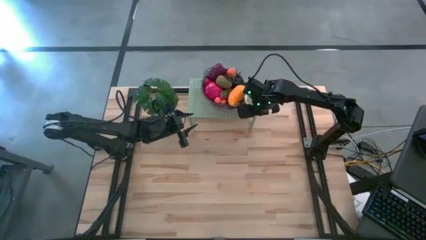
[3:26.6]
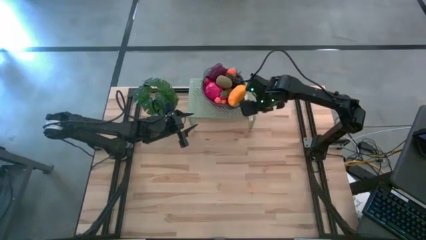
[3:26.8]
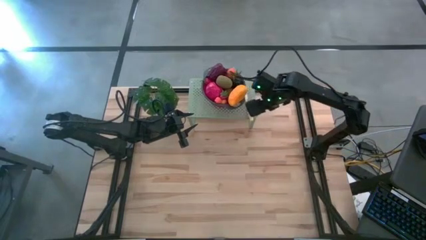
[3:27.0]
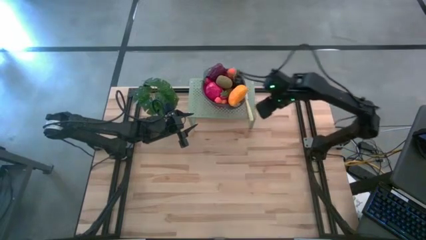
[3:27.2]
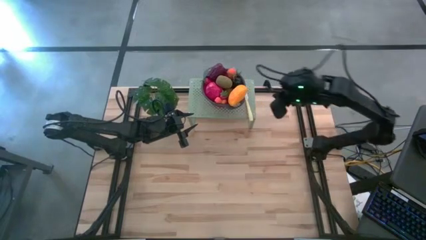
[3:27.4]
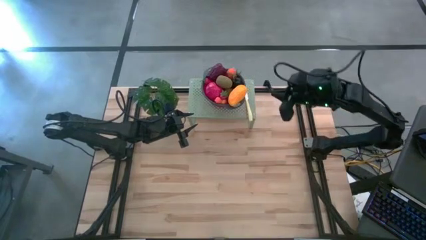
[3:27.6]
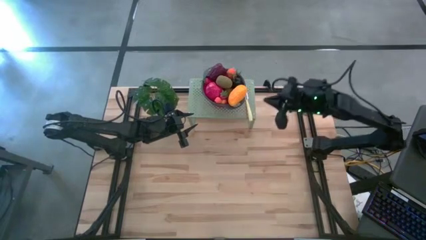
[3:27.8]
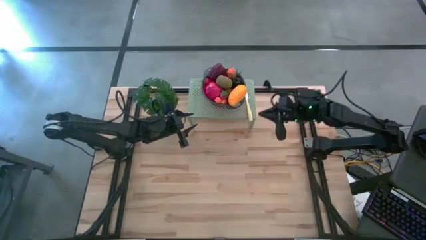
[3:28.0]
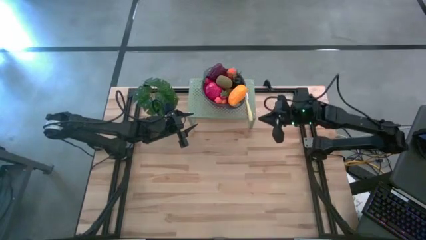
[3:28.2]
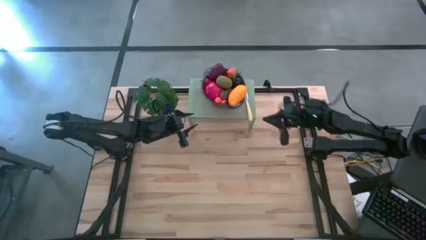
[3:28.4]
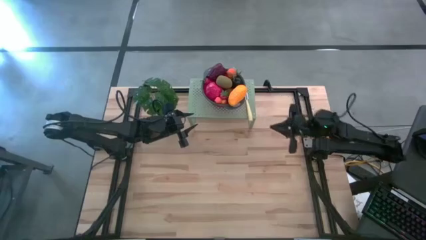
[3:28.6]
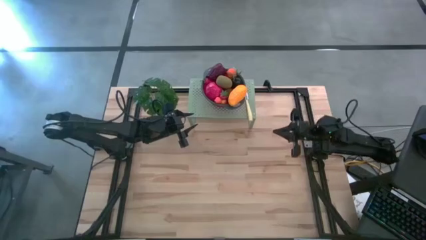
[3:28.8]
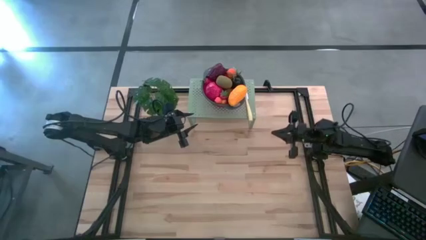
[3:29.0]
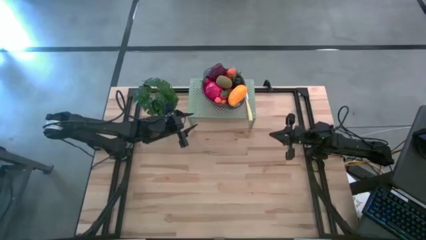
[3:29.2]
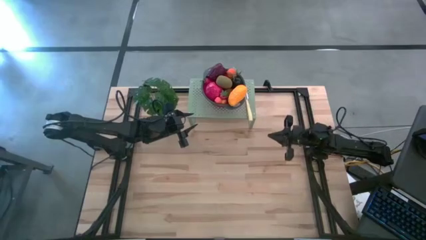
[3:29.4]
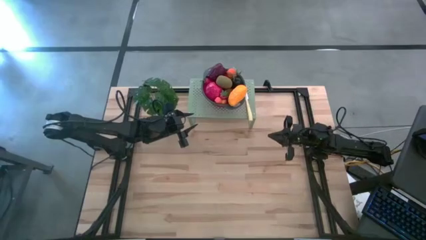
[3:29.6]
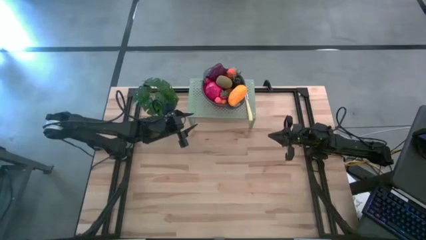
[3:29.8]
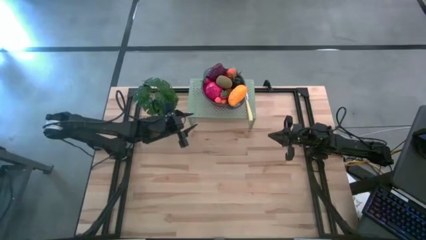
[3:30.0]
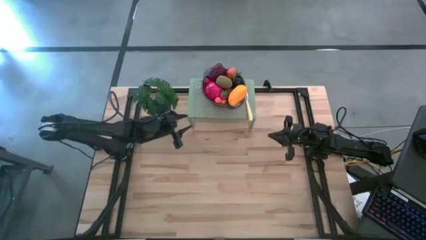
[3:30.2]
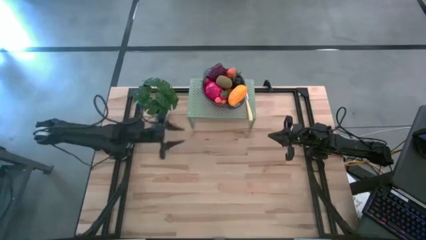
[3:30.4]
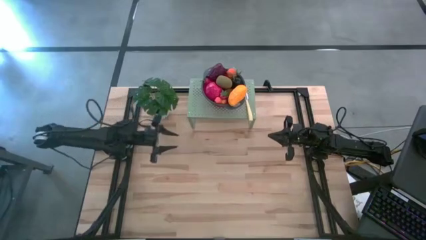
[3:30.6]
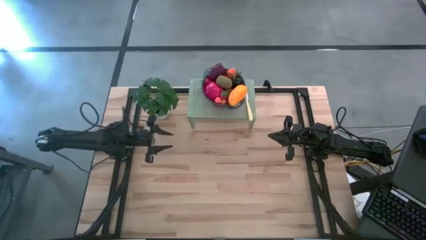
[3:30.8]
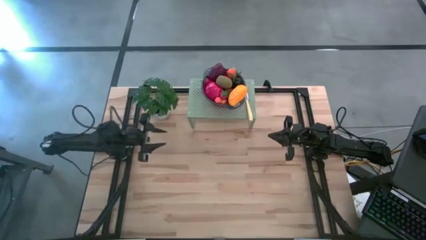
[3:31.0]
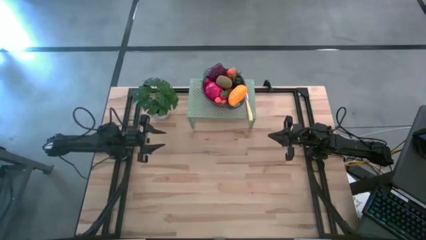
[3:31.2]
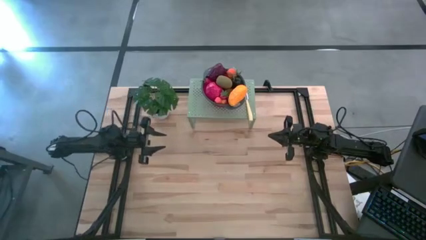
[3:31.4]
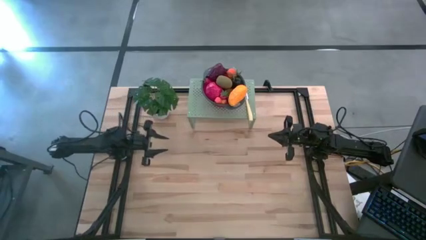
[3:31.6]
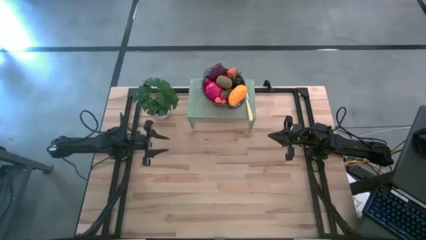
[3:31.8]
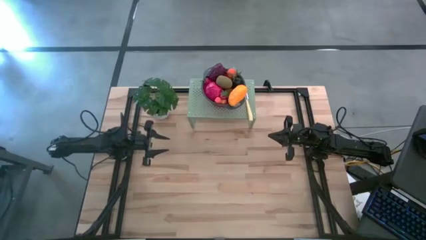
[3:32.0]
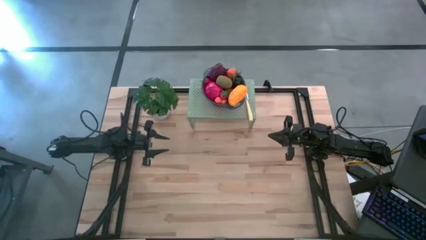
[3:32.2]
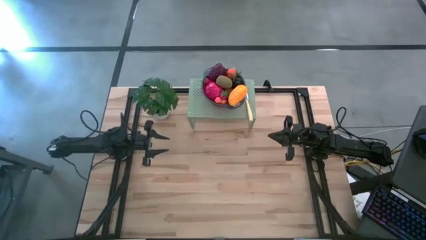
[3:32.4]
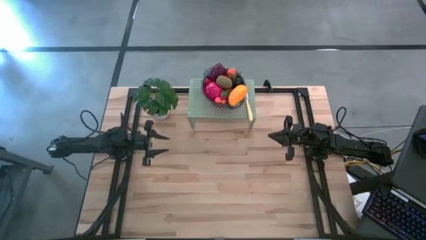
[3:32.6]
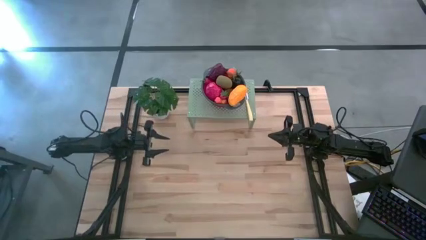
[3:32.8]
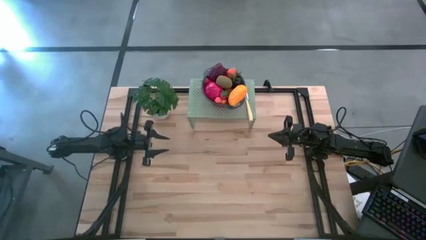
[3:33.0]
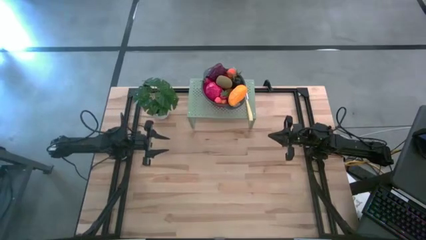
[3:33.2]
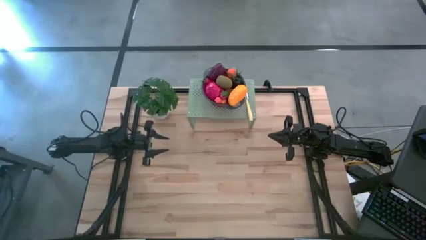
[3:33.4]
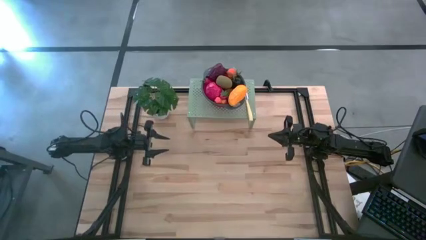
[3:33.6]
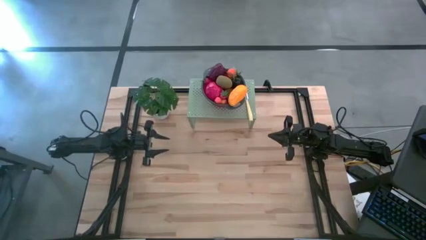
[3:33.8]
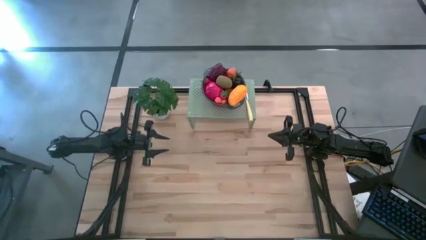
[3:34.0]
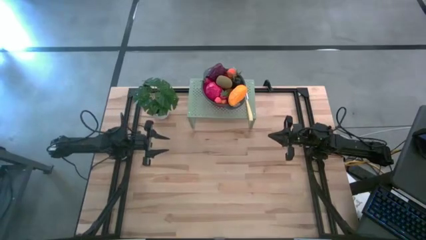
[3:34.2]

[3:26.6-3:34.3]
Task: Pick & Place Fruit
Return to Home Position

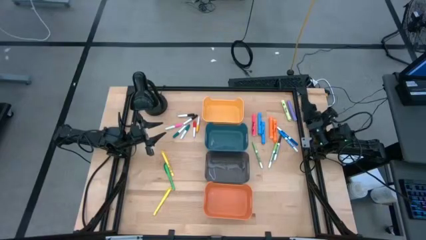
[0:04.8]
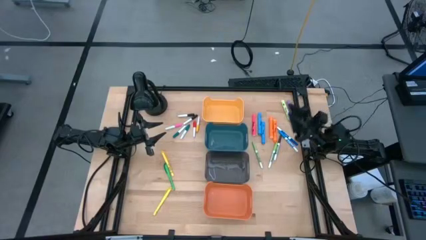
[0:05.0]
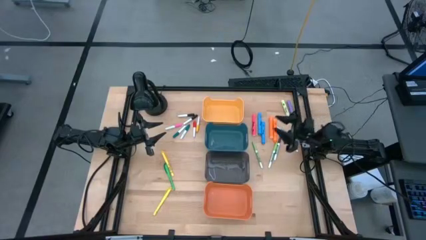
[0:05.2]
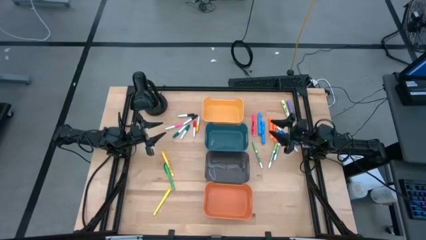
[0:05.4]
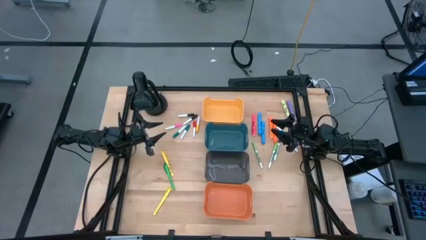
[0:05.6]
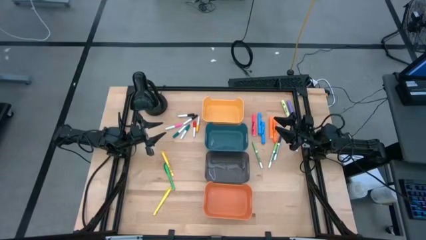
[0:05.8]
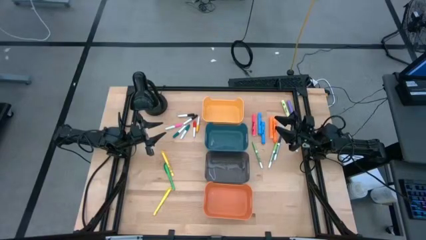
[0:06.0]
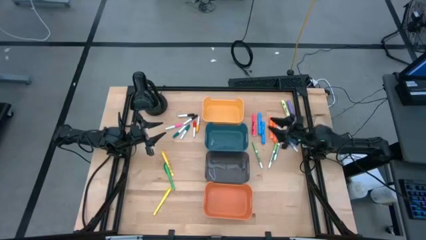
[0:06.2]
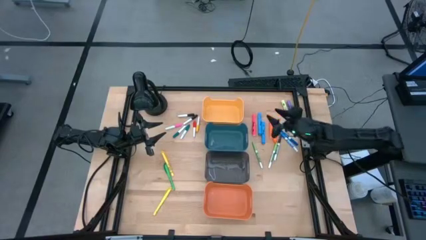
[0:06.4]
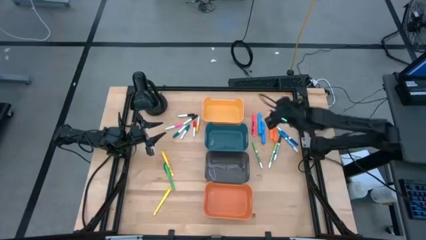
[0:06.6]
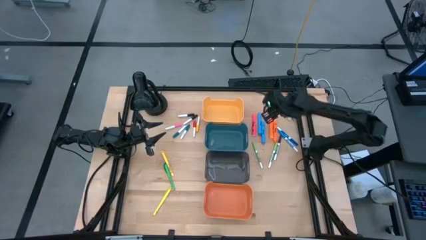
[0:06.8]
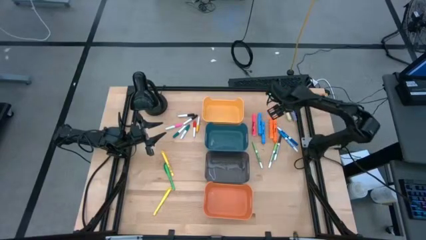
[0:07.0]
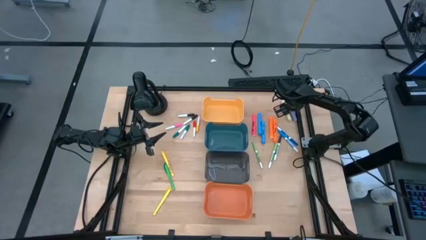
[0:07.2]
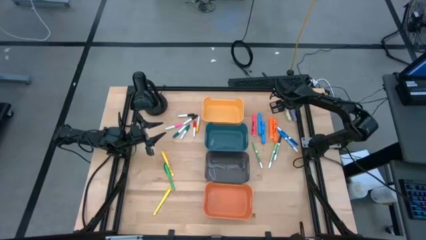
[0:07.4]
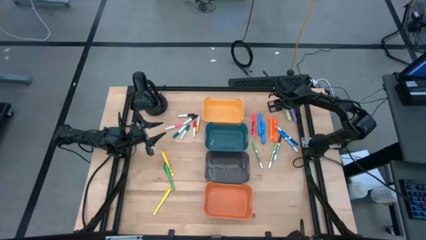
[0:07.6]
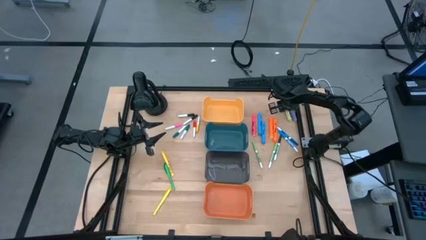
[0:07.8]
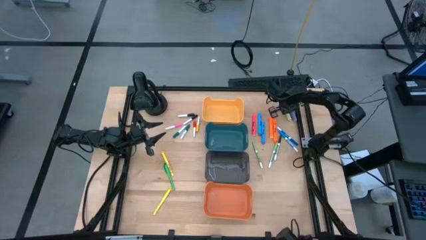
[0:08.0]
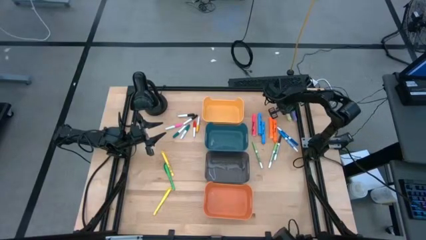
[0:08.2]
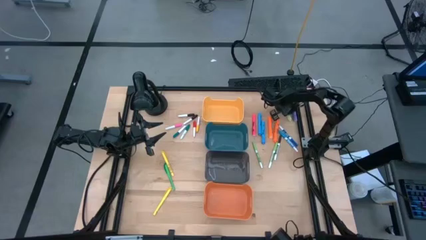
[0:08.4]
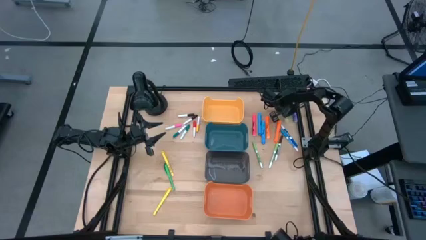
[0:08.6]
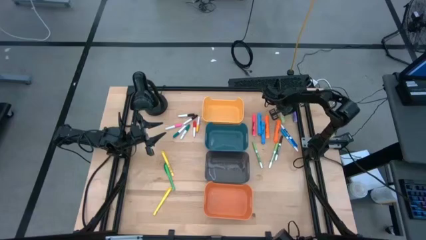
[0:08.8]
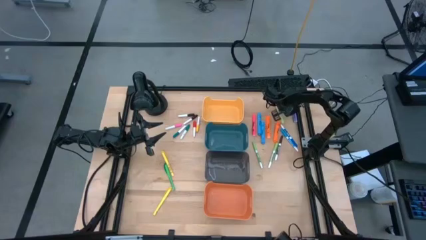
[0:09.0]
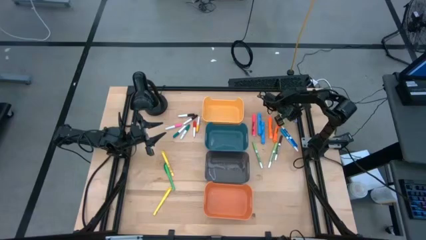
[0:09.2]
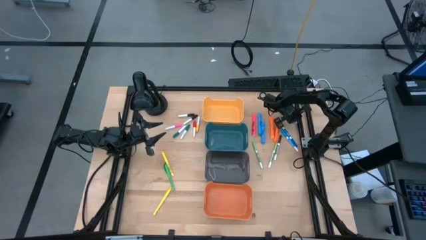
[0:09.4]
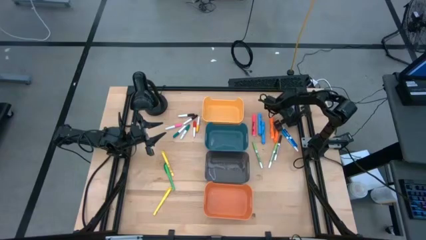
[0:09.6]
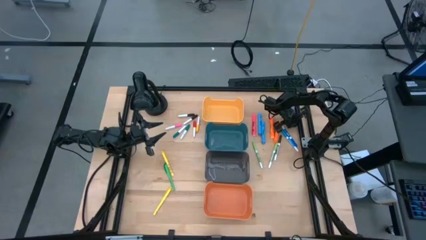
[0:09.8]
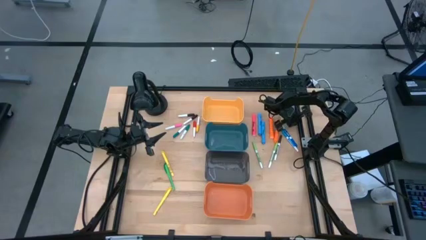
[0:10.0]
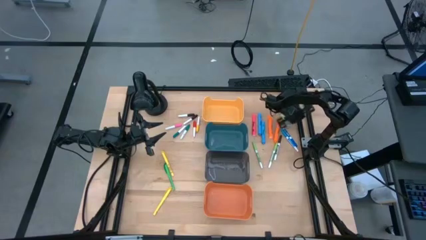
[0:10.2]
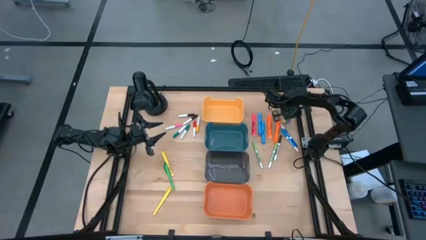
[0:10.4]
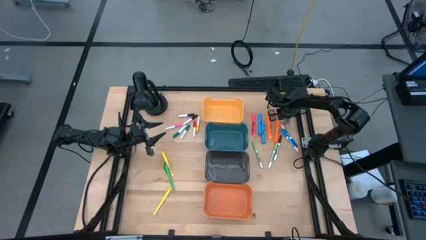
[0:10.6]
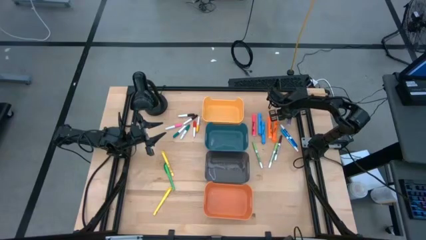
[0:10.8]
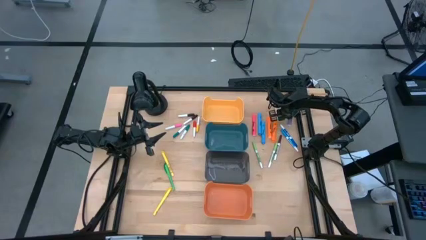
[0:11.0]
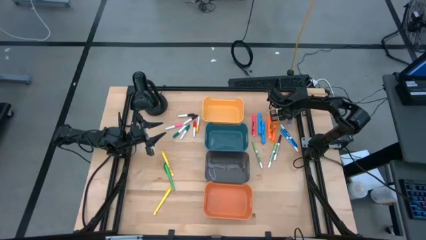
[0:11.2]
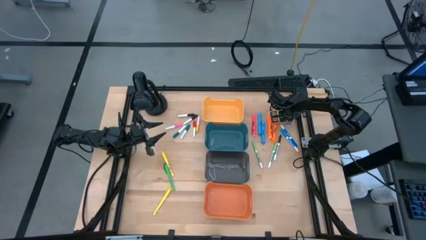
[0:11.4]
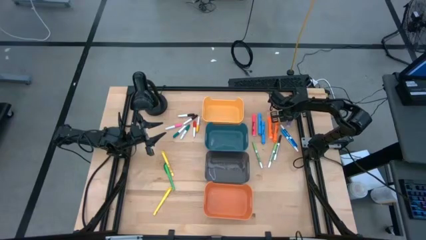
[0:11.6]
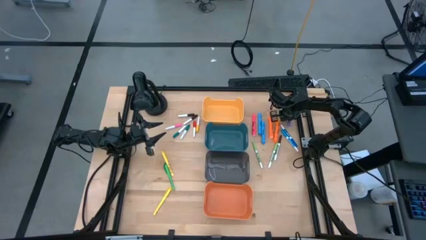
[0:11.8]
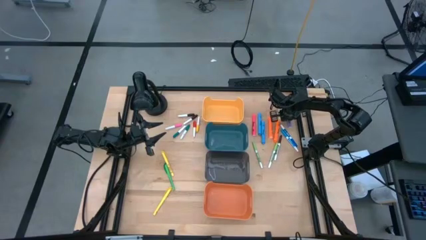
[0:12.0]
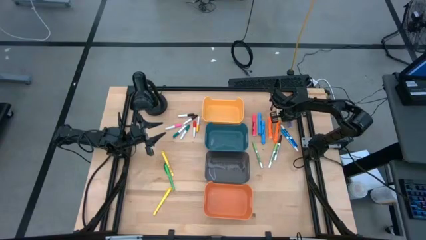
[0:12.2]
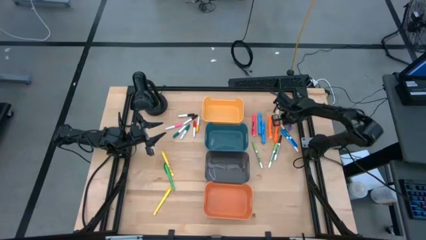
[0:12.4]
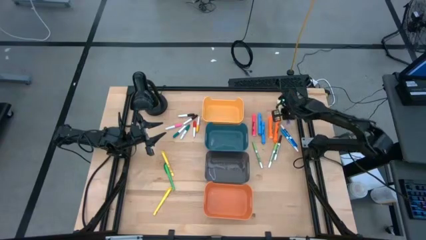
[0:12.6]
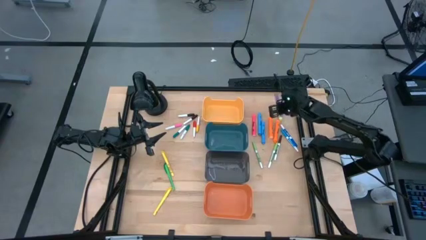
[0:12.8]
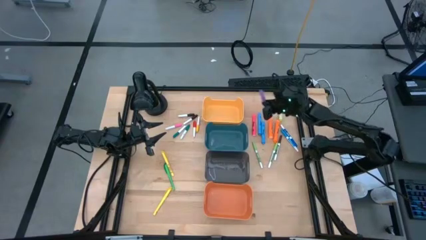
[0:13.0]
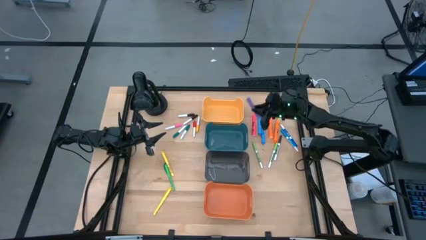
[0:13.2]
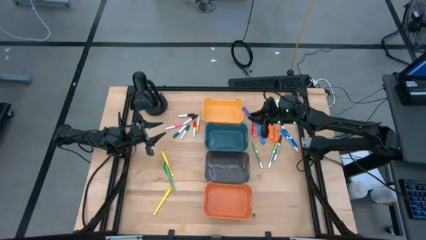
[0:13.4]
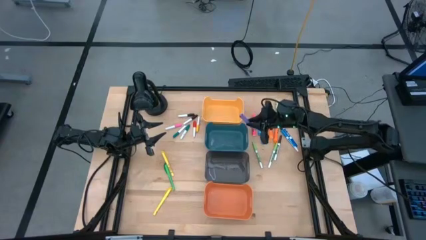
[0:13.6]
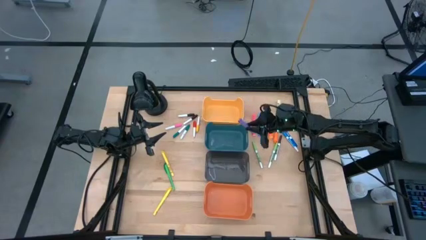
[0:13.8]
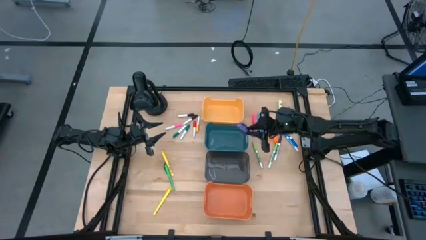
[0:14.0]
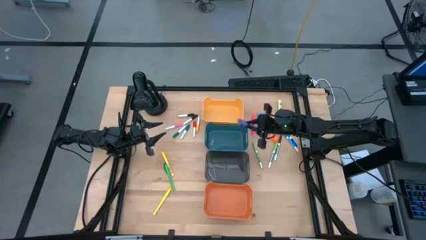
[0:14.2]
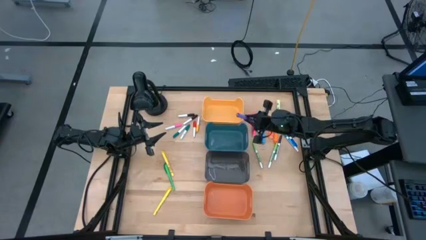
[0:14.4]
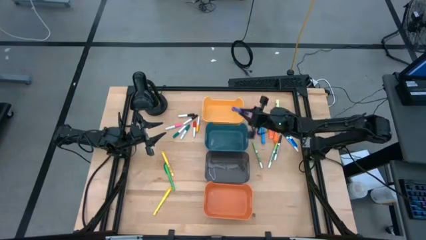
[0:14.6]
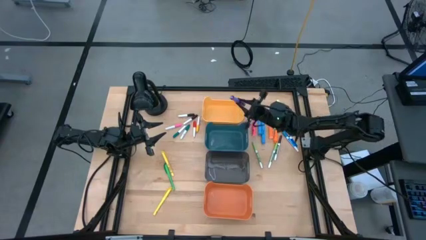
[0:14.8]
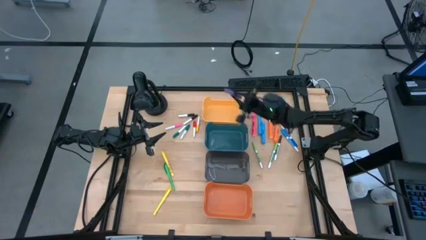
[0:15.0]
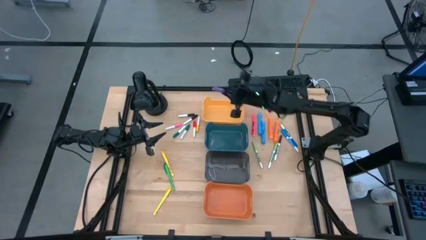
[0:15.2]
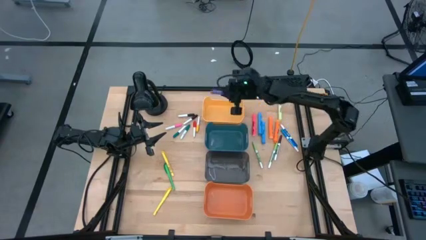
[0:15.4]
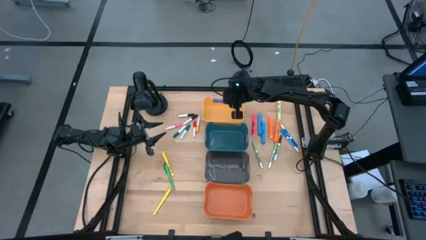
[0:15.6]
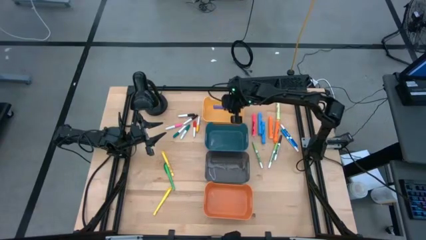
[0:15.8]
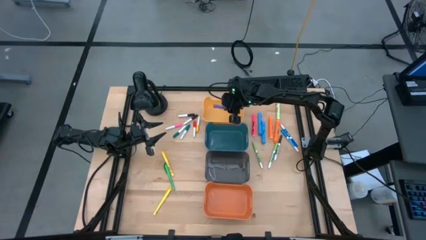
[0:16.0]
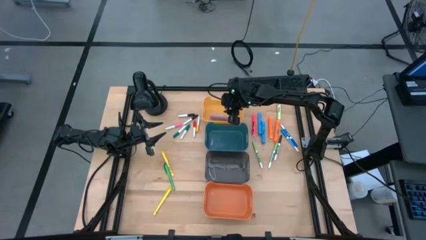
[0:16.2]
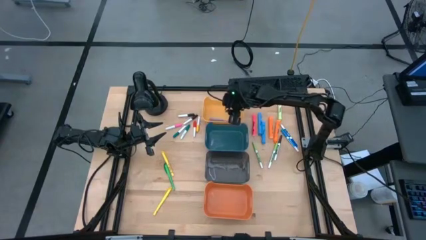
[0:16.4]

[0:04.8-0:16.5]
Task: Pick & Place Markers
Put the purple highlighter into the yellow bin
